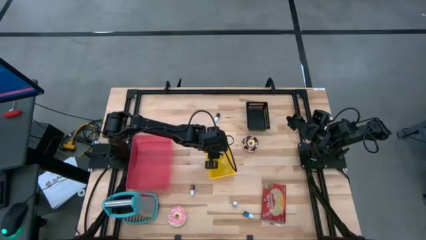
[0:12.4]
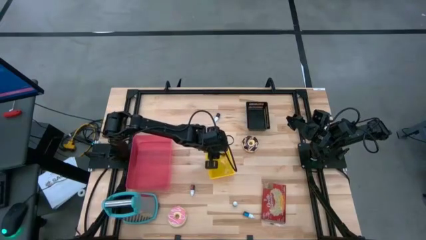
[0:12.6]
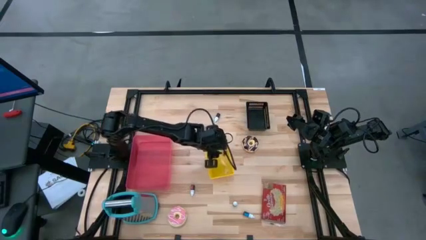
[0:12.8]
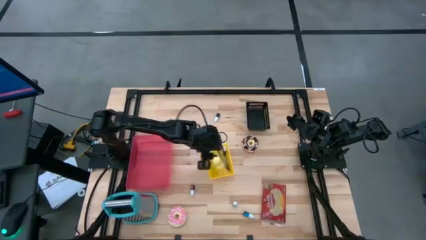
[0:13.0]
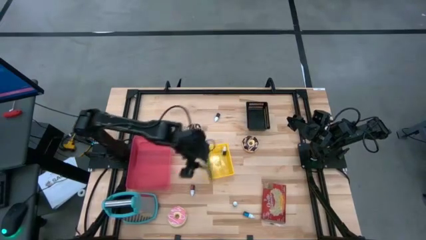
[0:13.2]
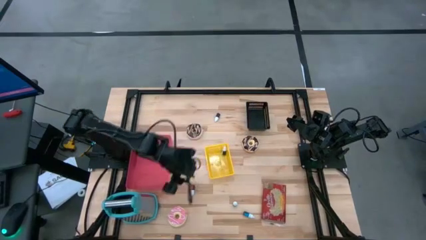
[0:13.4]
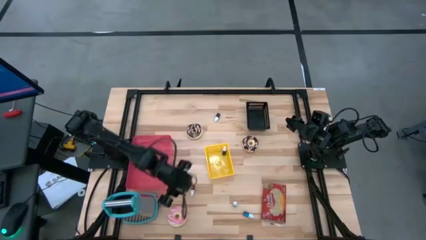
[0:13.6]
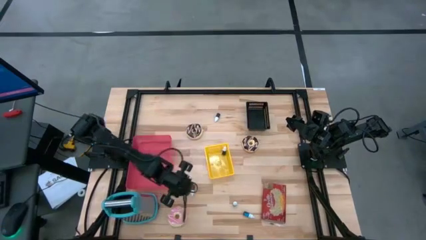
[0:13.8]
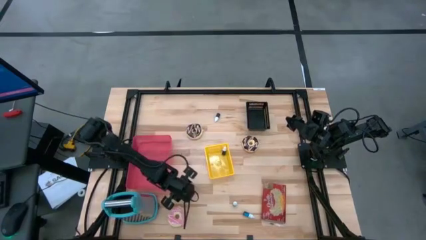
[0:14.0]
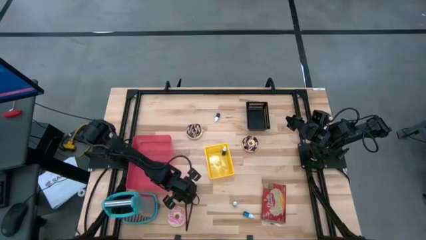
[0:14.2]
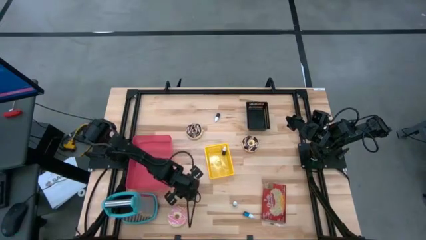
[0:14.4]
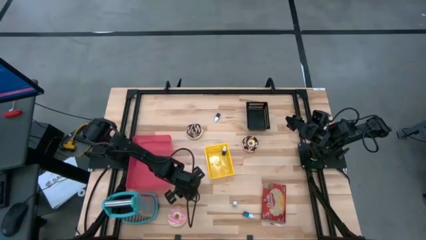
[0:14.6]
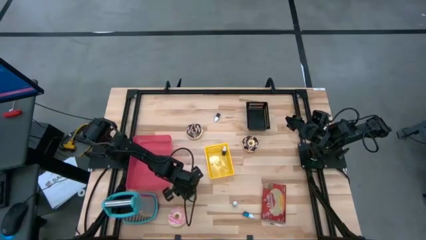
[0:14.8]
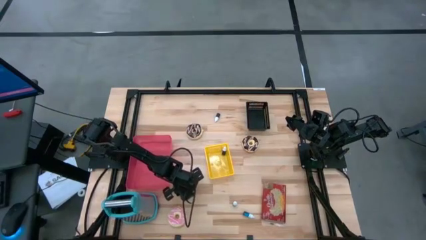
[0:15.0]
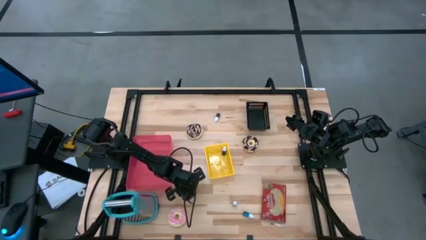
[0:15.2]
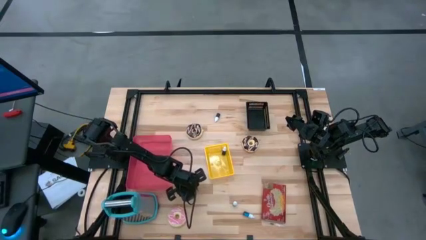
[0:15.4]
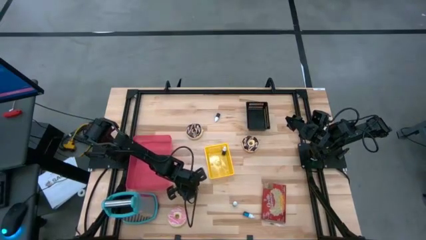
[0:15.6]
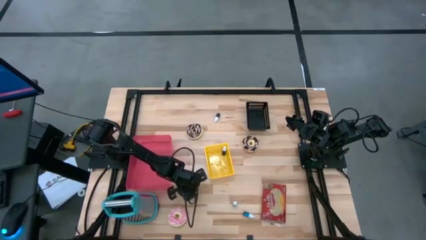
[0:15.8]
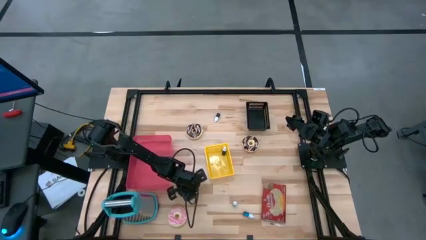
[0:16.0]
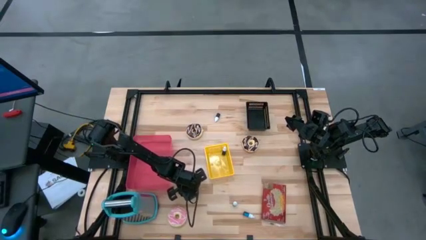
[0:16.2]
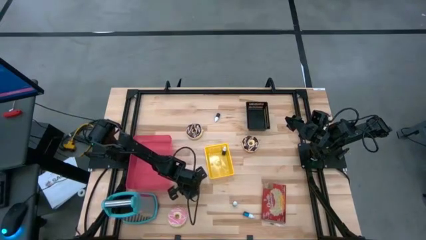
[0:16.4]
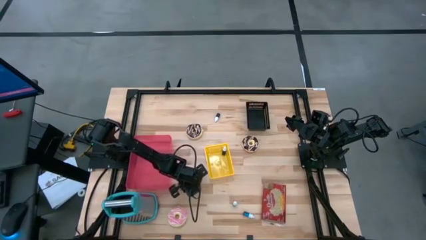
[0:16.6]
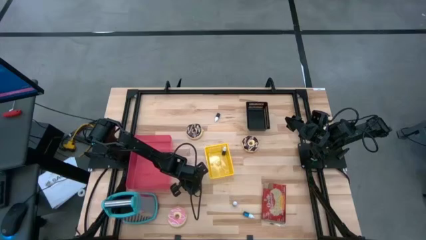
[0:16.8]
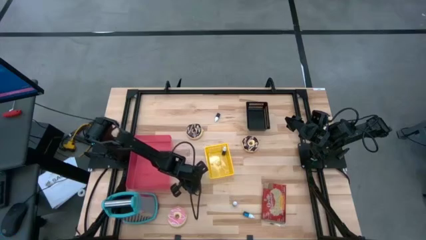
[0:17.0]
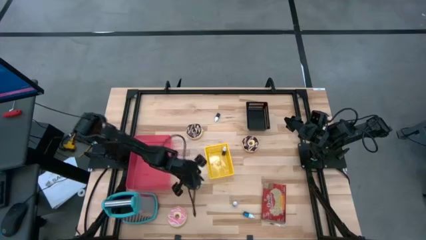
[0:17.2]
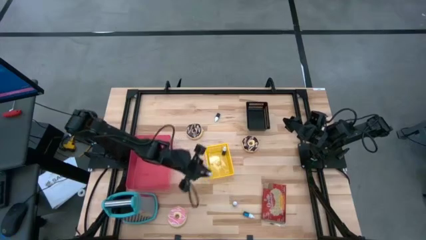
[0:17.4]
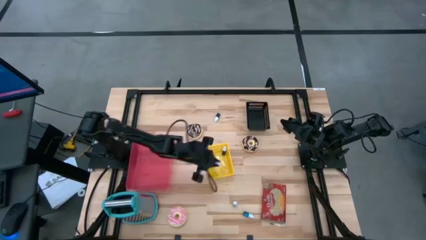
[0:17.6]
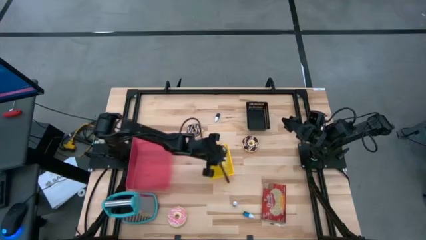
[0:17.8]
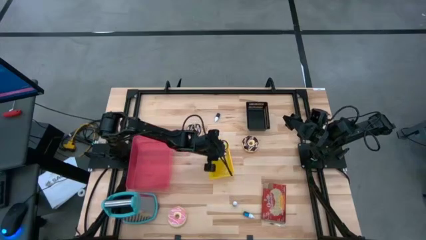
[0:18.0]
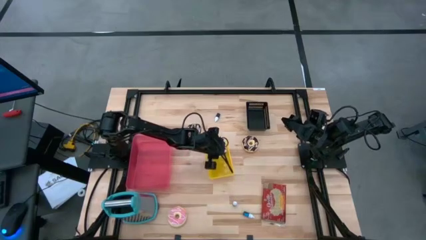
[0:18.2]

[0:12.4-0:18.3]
Put the red food coloring bottle into the yellow bin

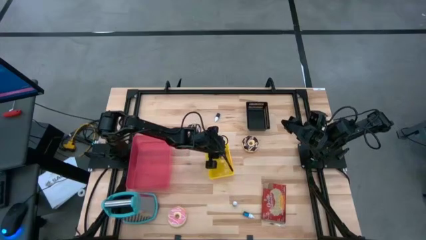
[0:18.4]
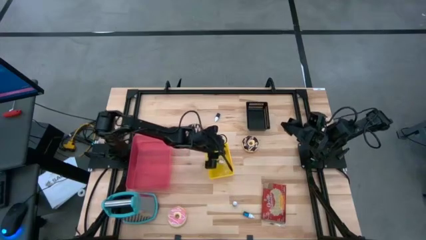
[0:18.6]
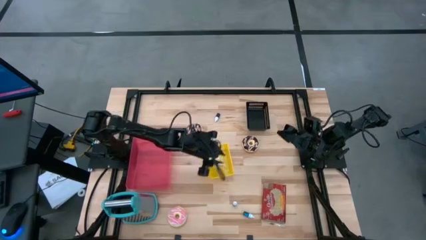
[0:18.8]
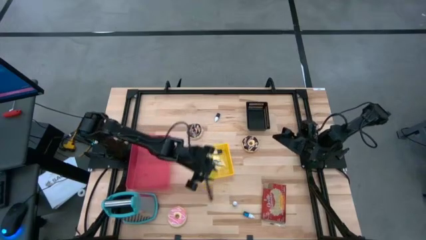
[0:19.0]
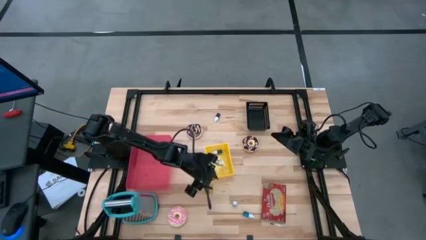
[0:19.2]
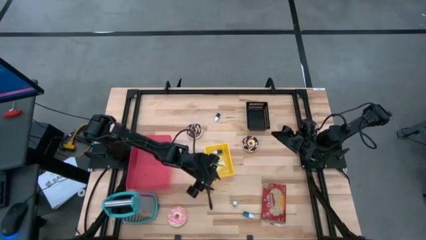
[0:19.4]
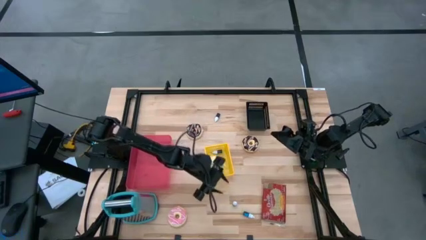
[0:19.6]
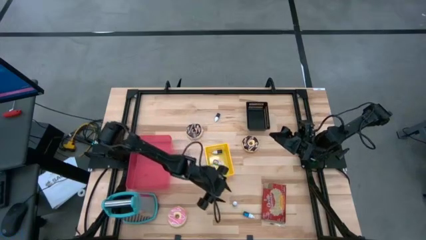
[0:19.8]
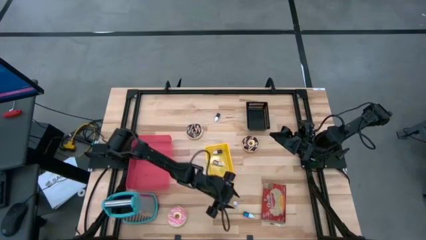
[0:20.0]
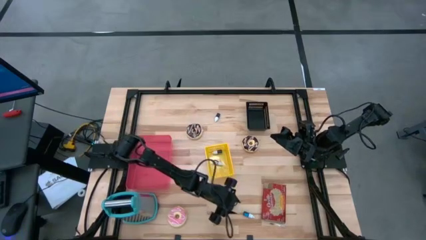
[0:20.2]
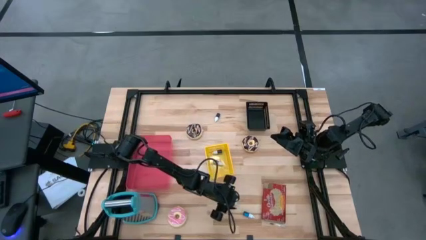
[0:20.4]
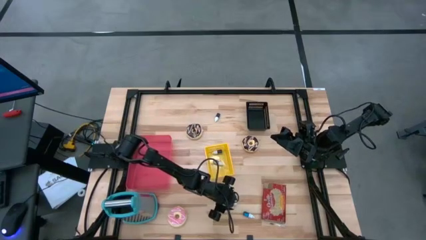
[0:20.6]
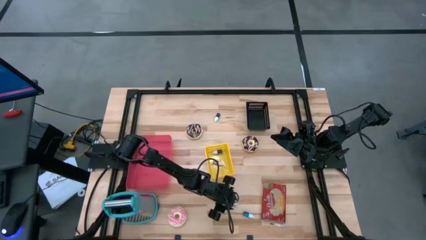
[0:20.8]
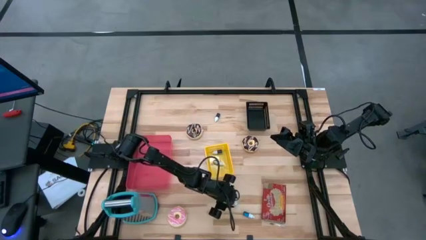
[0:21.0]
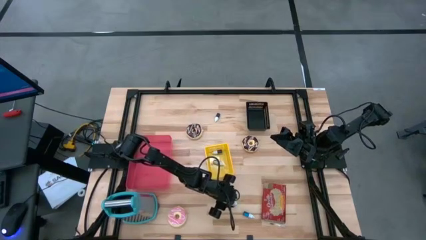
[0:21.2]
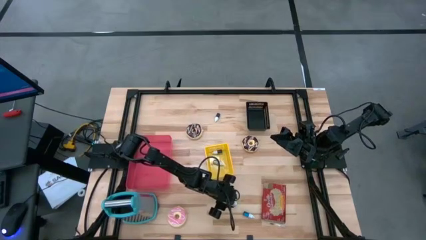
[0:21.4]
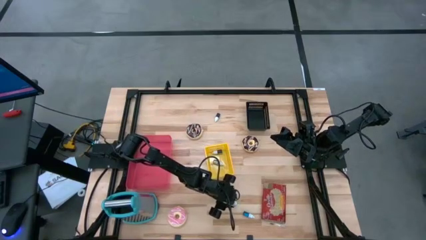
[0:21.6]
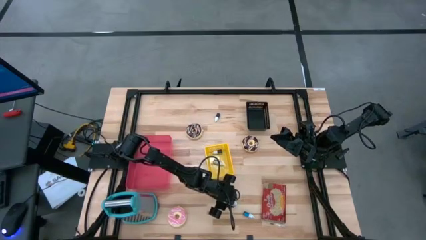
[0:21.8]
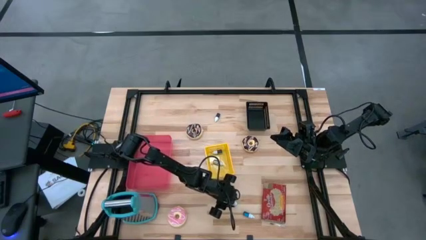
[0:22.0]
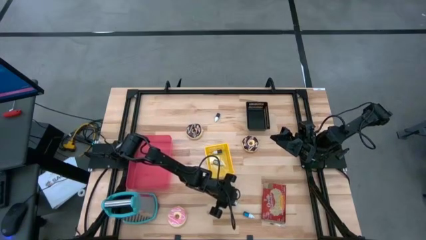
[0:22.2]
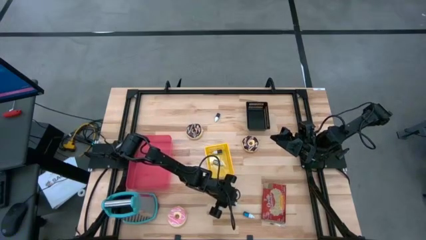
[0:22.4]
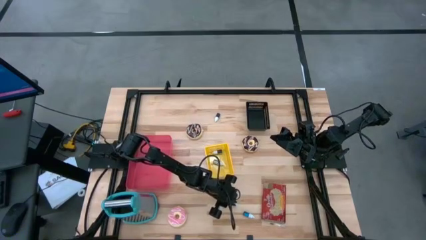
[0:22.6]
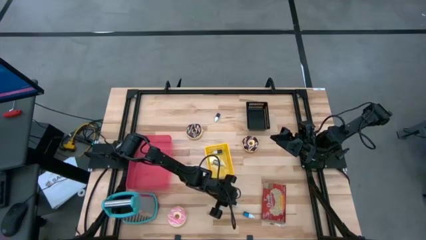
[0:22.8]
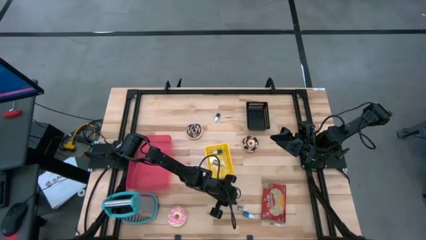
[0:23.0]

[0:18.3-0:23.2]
Put the green food coloring bottle into the yellow bin

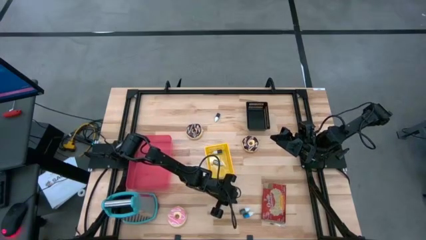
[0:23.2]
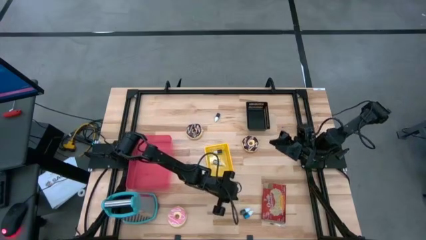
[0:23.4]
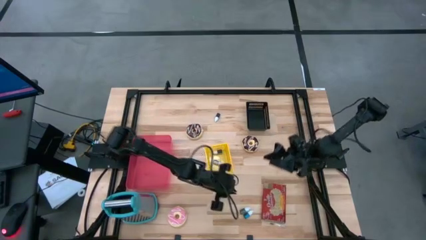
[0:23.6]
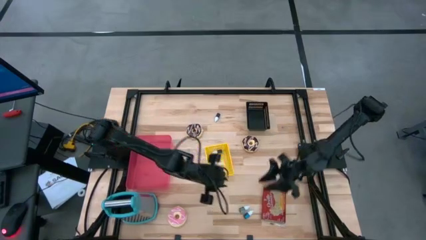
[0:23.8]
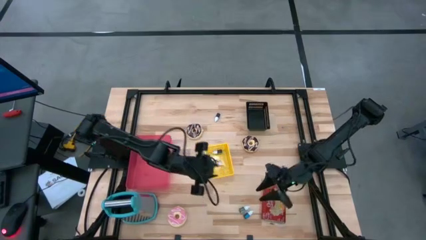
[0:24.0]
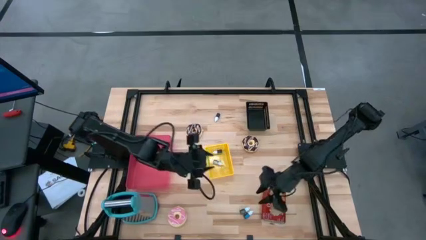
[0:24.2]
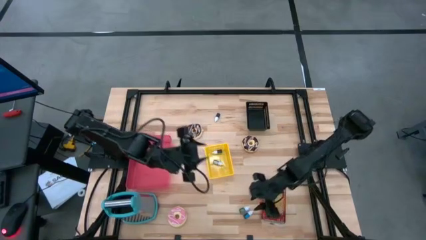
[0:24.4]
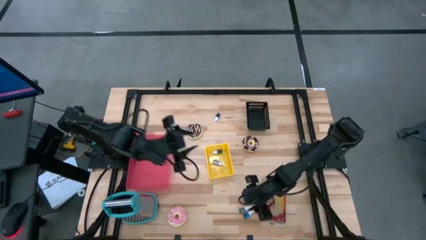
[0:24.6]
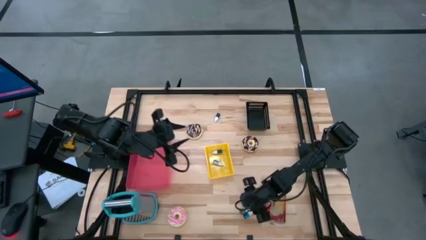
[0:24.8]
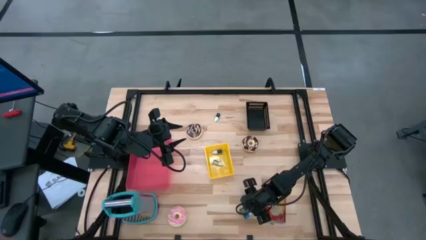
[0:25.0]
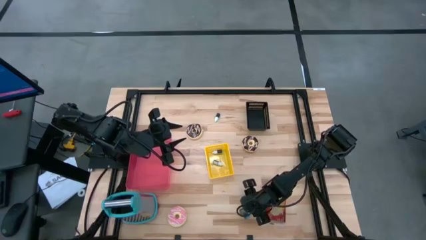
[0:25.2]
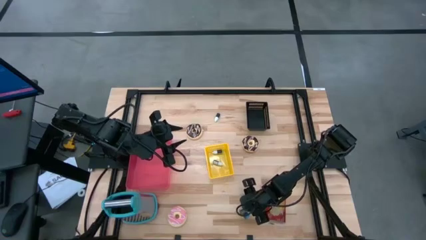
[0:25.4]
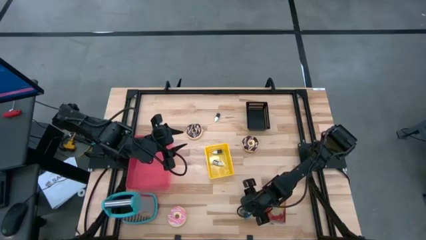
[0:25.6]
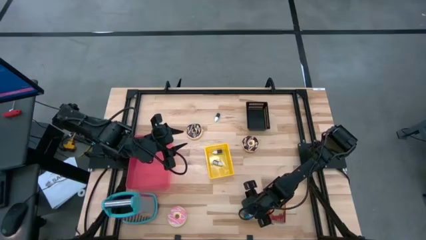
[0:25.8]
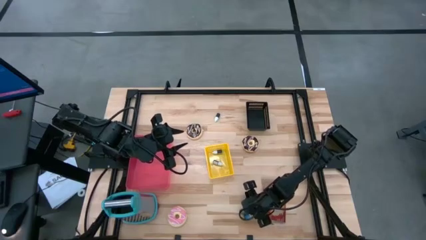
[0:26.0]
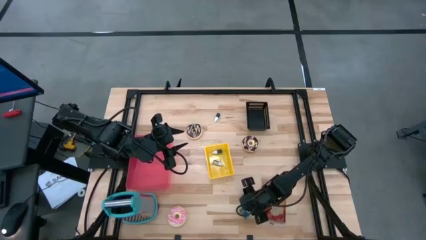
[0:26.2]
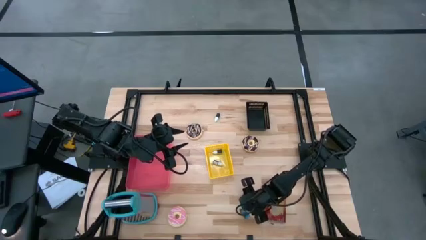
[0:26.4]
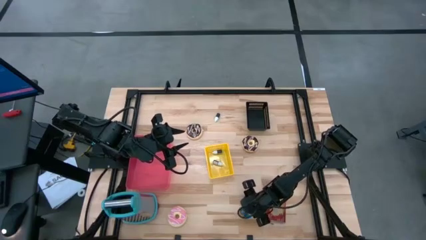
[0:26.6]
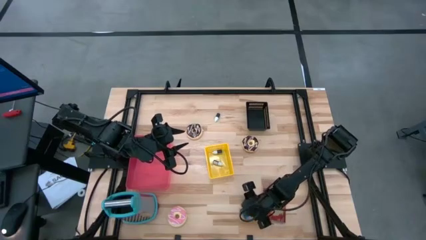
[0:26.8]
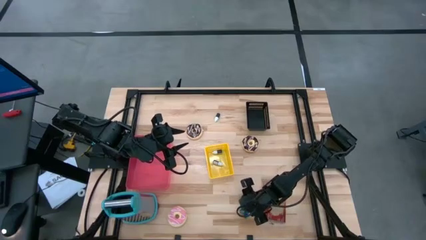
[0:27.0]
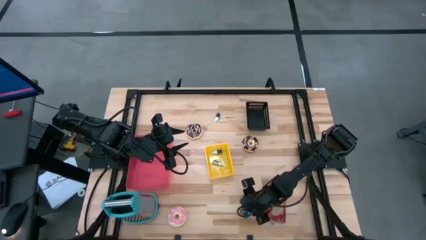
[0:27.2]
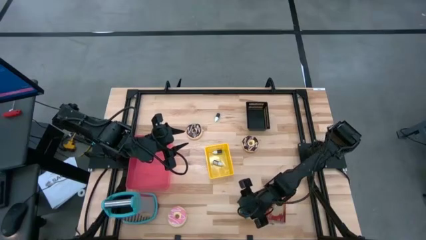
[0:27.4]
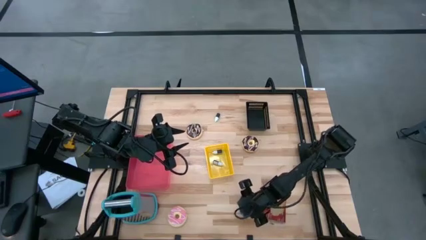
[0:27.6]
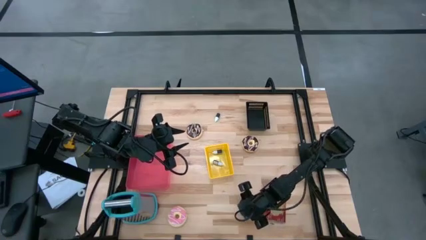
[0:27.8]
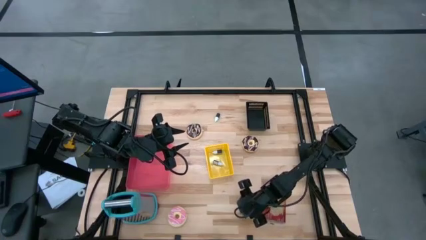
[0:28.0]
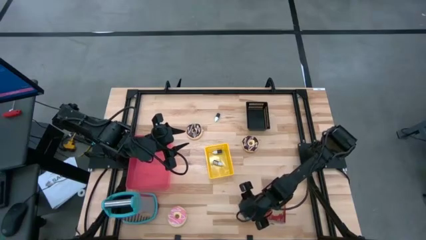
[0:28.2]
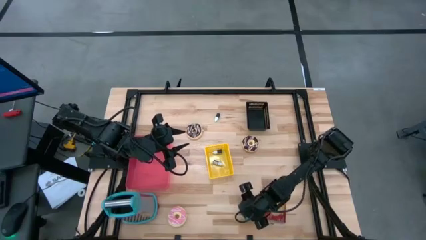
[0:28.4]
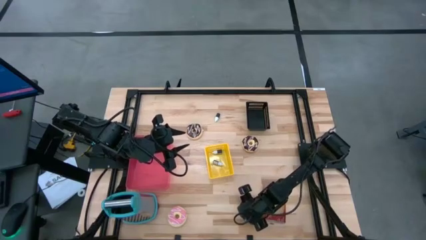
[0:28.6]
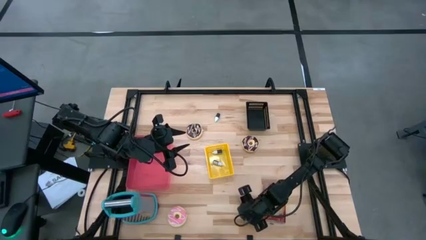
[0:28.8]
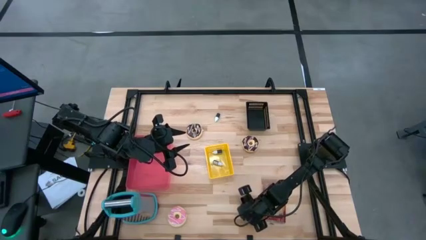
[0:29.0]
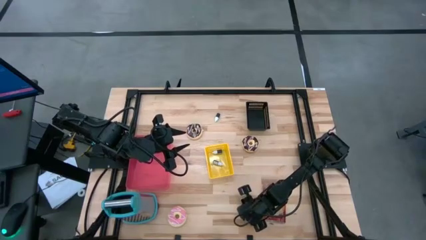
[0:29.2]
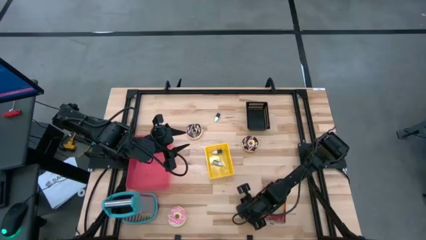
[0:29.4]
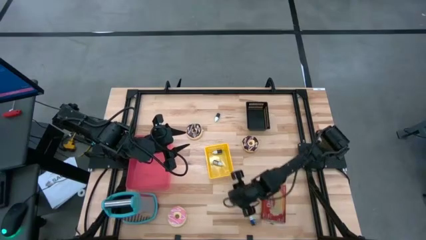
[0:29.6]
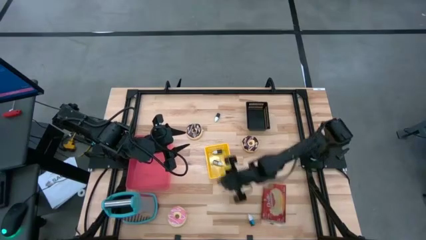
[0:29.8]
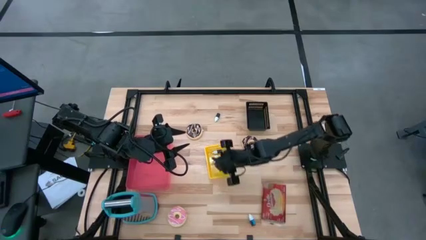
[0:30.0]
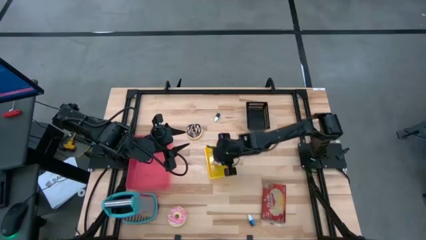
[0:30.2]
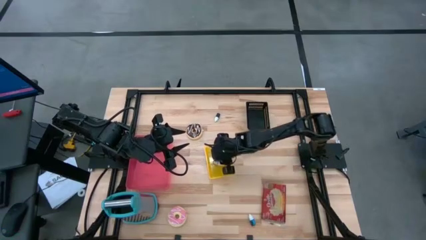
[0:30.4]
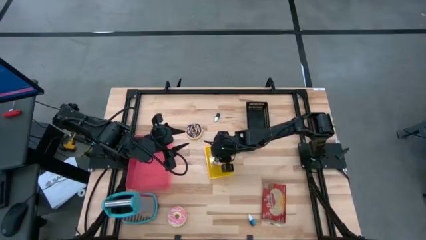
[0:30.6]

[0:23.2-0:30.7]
Put the green food coloring bottle into the yellow bin
